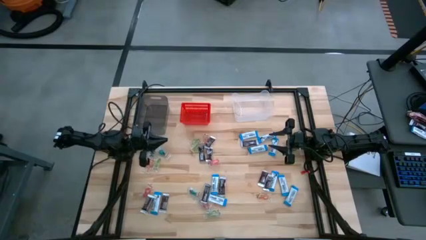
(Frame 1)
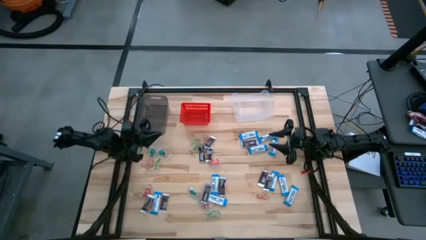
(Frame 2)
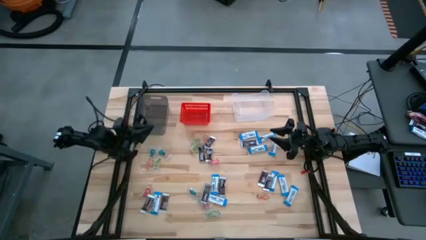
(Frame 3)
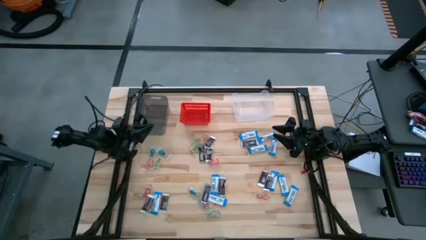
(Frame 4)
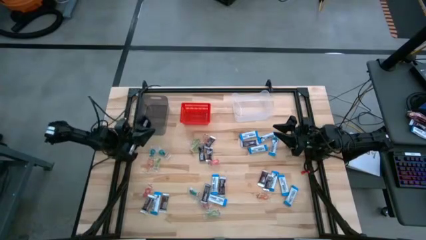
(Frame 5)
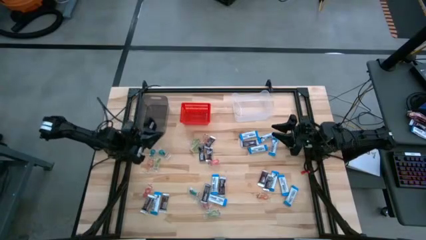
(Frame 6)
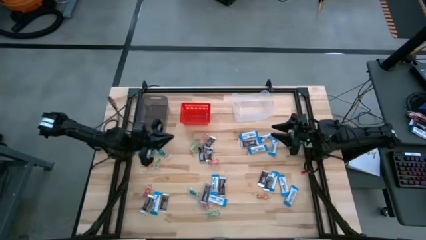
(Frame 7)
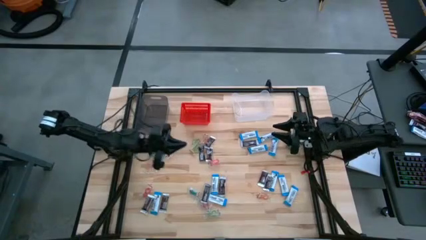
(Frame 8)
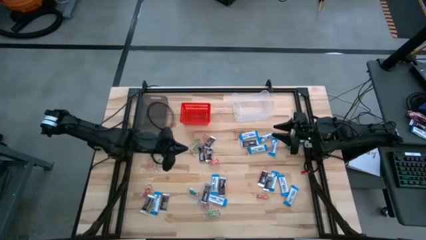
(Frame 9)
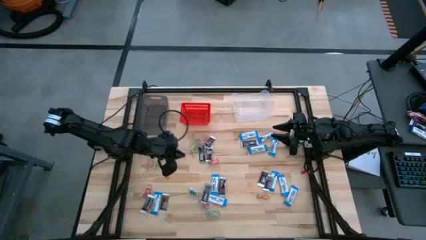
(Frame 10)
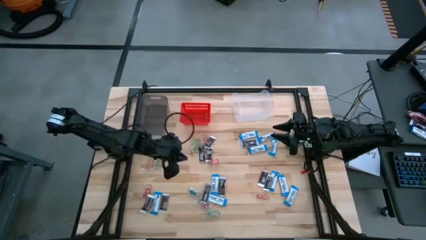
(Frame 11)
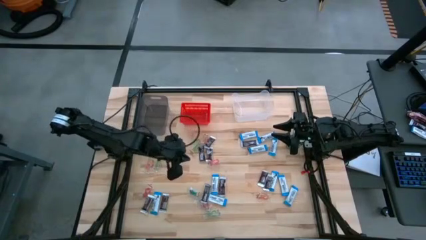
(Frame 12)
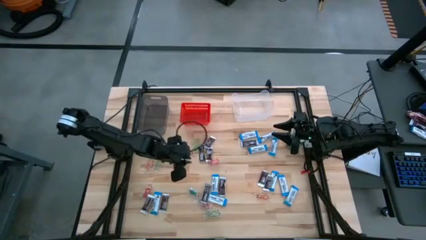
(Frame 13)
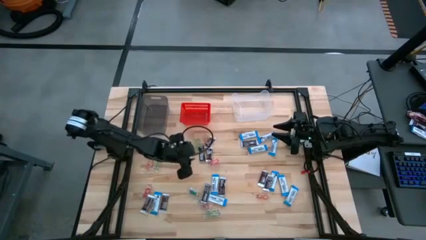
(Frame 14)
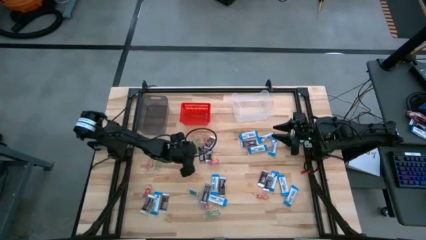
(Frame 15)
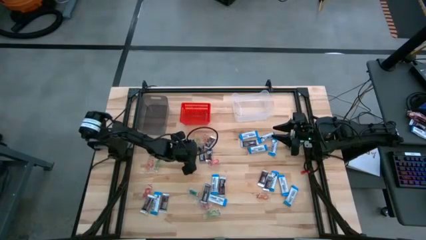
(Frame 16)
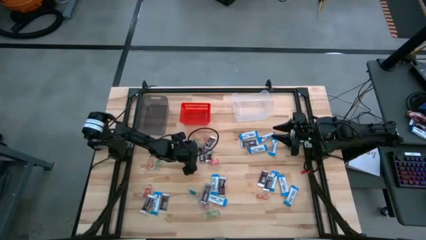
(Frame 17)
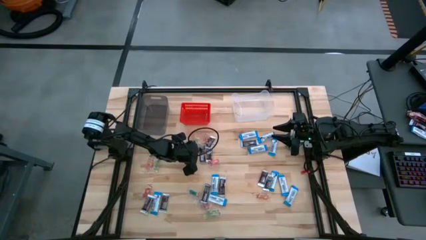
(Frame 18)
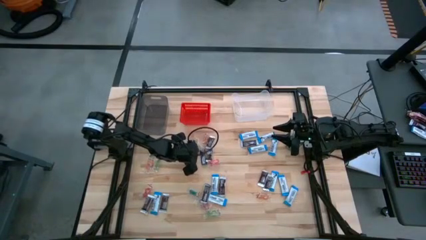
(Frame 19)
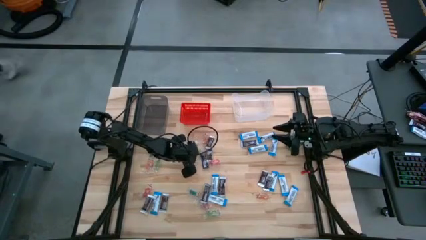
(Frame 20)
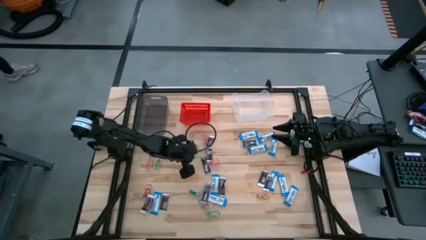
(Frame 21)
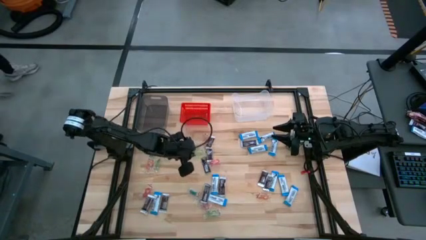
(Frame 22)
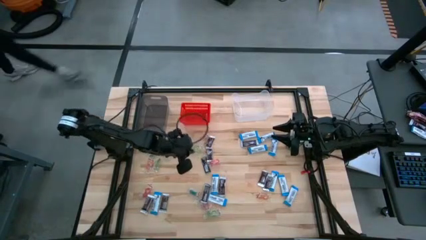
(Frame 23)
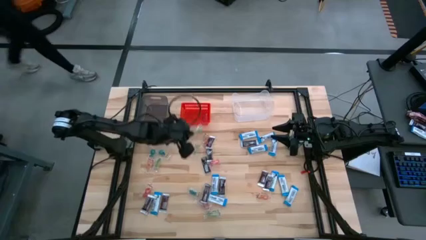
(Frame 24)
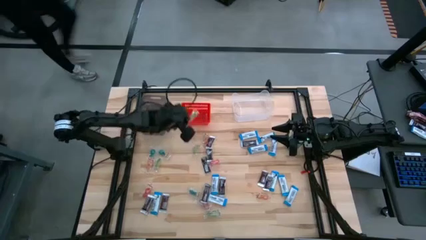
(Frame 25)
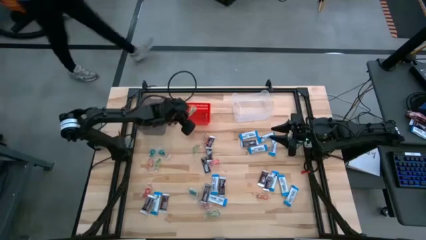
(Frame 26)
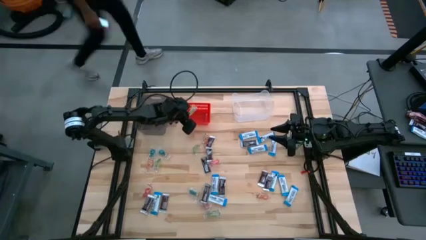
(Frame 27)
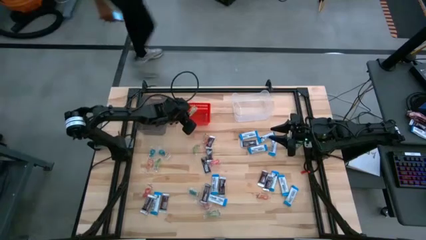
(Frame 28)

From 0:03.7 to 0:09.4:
Task: Sort candy
Put the green gummy into the red bin

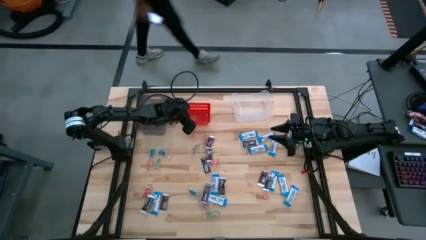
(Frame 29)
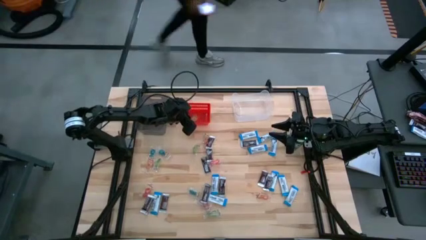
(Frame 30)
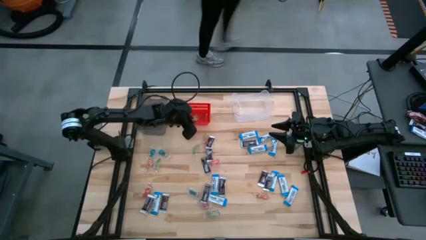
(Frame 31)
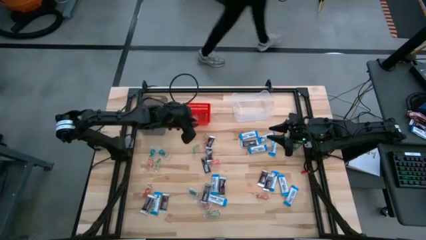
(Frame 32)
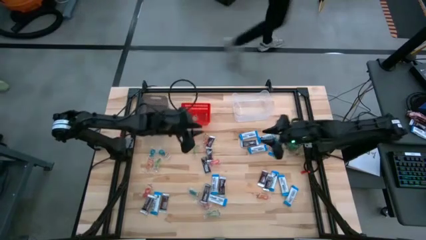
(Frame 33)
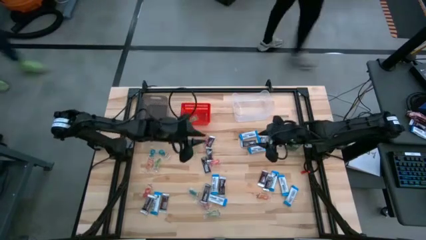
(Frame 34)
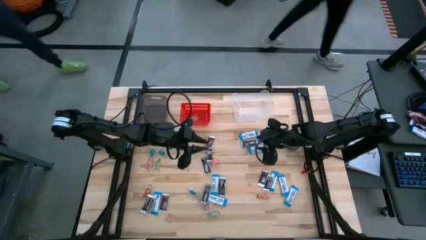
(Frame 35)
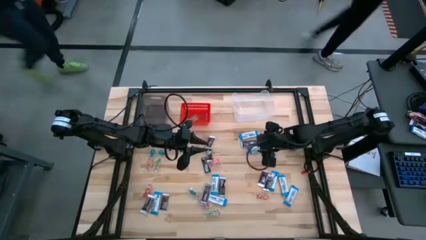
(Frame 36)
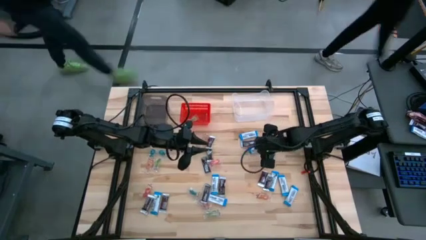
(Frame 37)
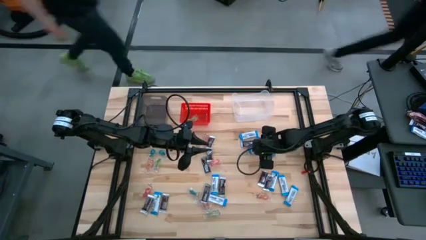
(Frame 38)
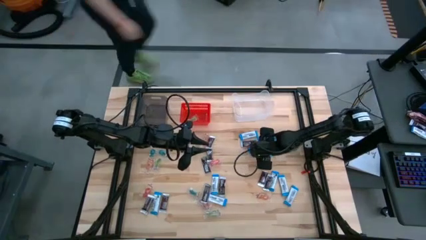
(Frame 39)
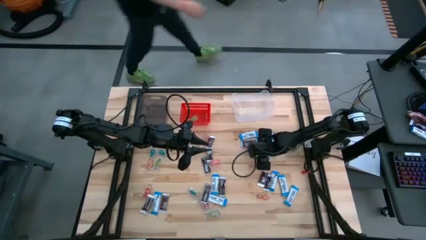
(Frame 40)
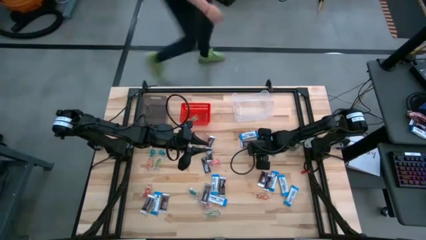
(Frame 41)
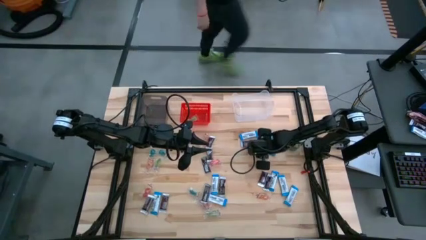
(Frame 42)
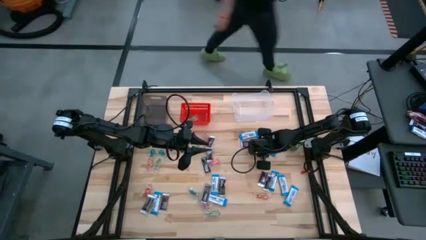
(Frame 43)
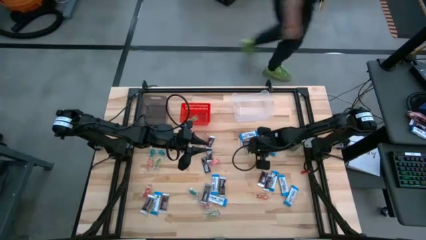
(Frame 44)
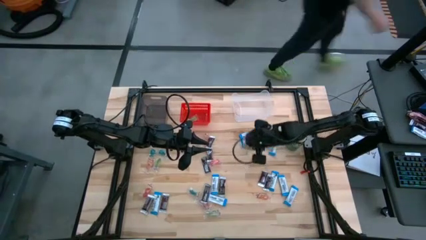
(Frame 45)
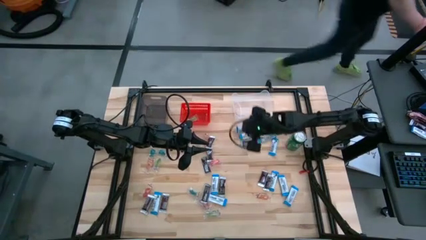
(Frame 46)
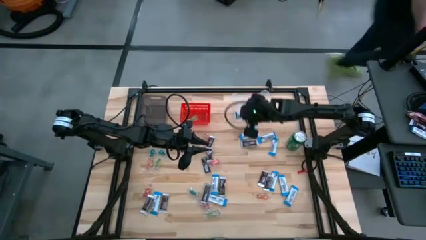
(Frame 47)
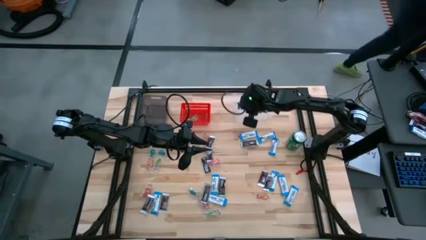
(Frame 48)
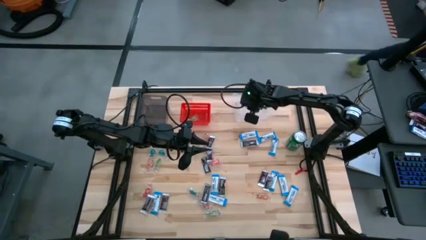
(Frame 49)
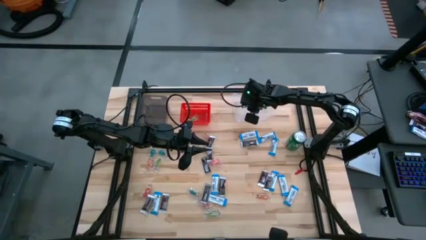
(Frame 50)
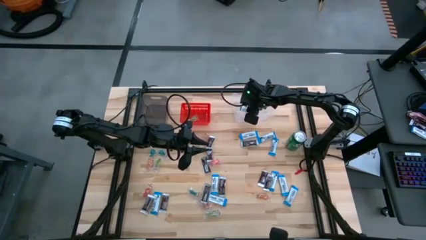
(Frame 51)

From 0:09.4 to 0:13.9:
Put the white chocolate into the transparent bin

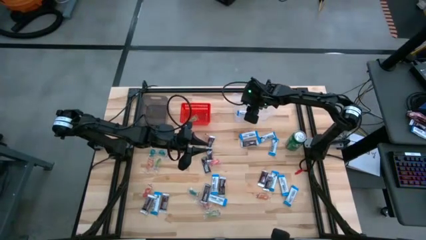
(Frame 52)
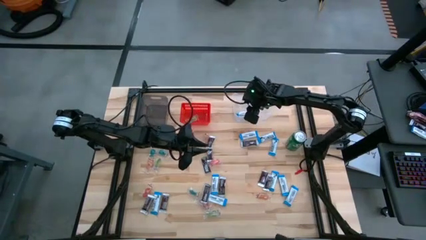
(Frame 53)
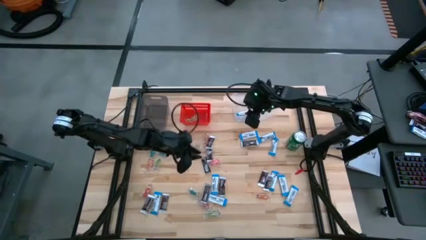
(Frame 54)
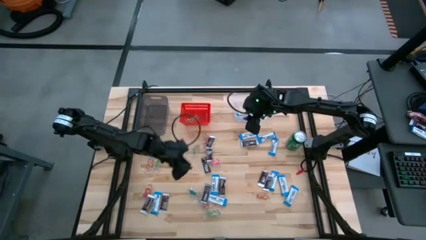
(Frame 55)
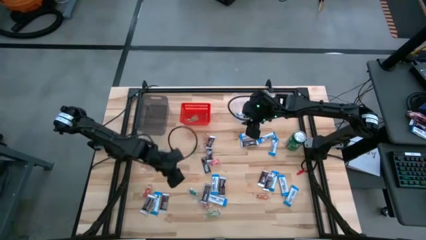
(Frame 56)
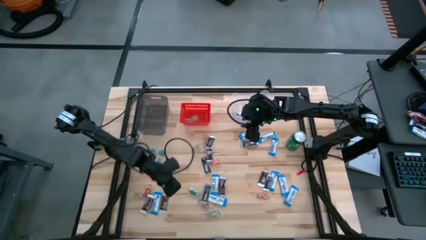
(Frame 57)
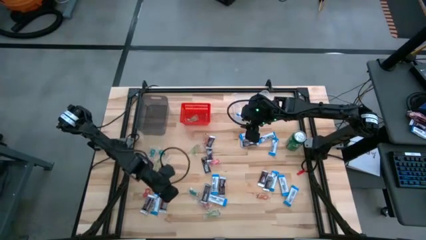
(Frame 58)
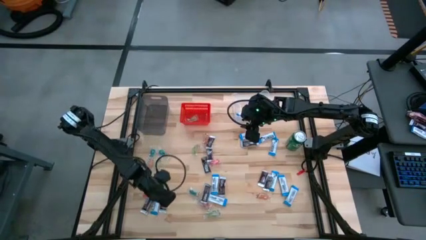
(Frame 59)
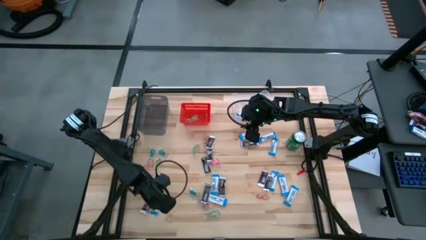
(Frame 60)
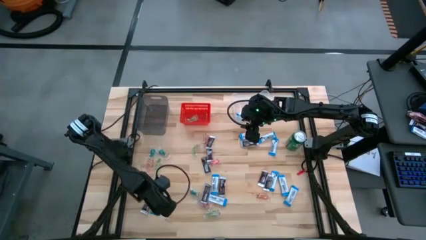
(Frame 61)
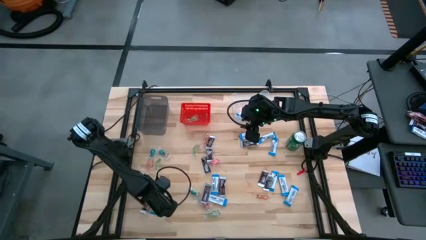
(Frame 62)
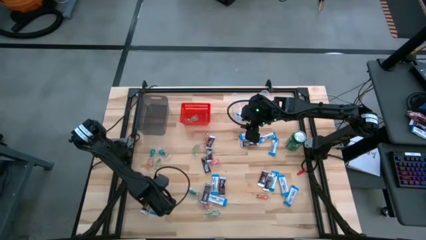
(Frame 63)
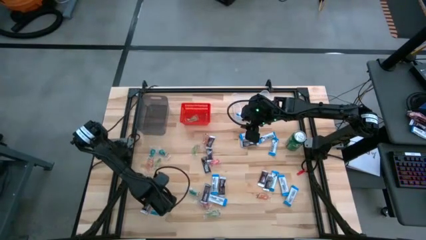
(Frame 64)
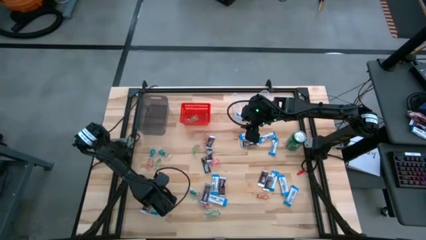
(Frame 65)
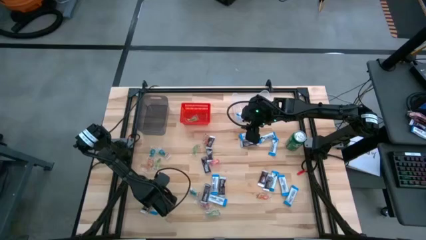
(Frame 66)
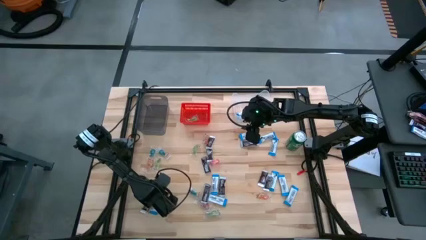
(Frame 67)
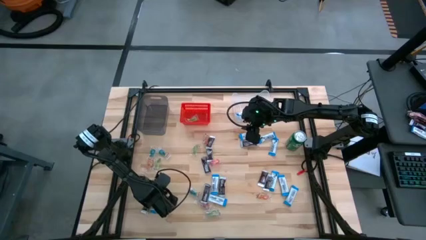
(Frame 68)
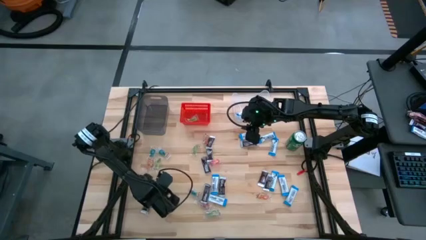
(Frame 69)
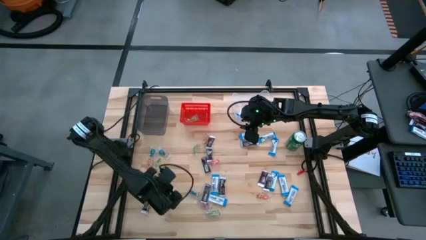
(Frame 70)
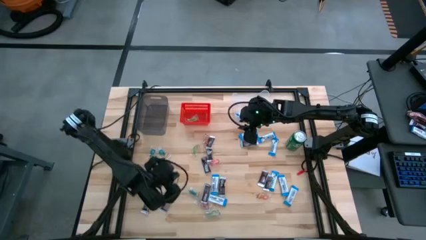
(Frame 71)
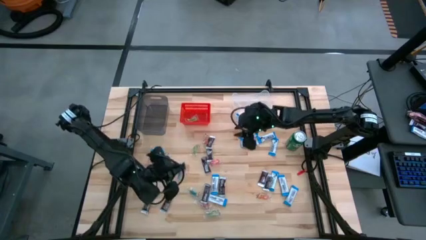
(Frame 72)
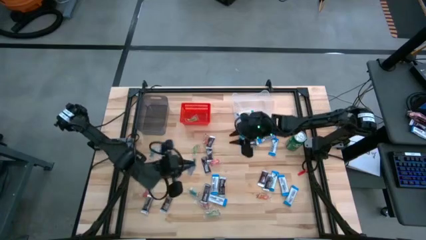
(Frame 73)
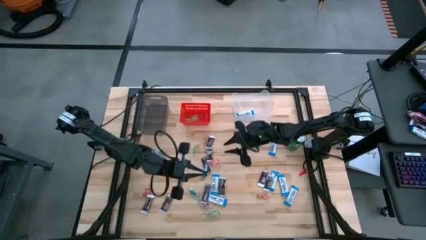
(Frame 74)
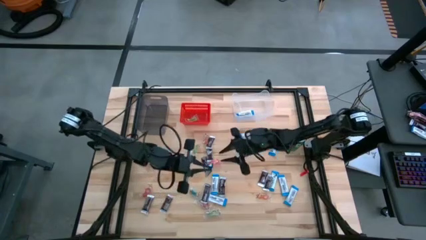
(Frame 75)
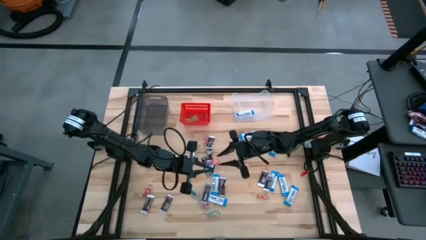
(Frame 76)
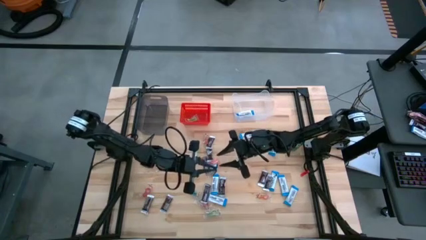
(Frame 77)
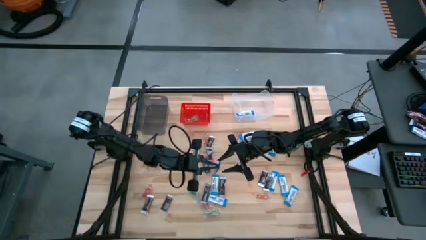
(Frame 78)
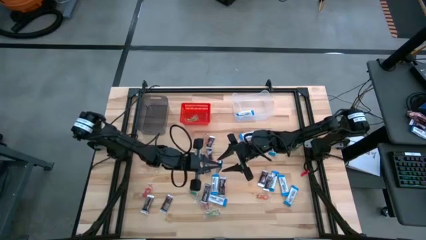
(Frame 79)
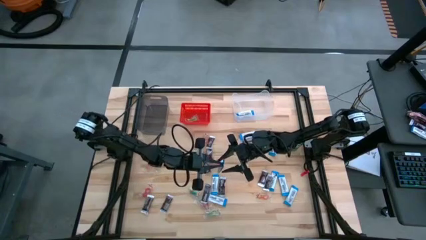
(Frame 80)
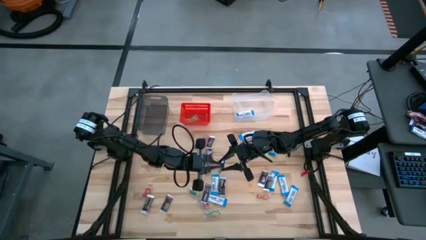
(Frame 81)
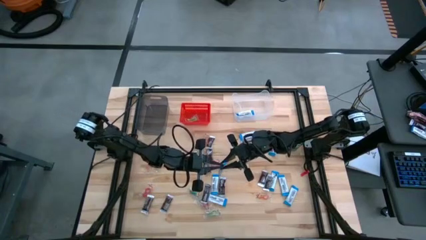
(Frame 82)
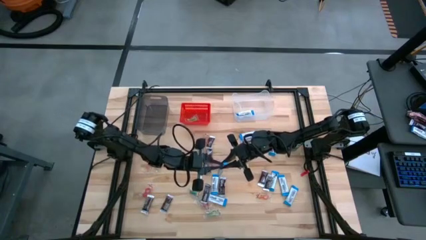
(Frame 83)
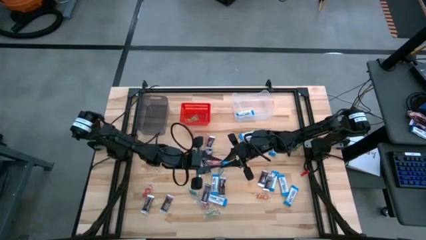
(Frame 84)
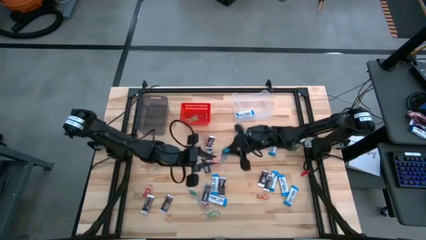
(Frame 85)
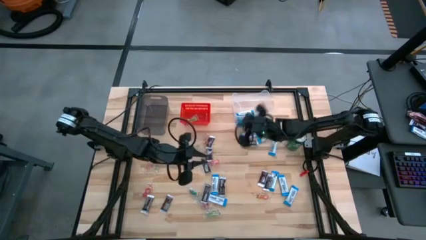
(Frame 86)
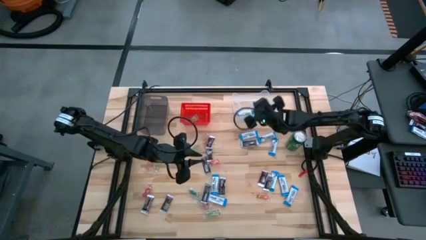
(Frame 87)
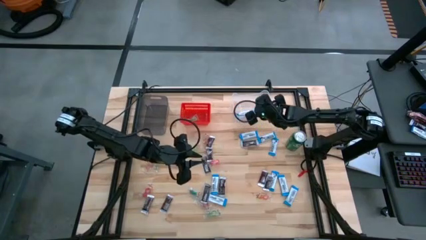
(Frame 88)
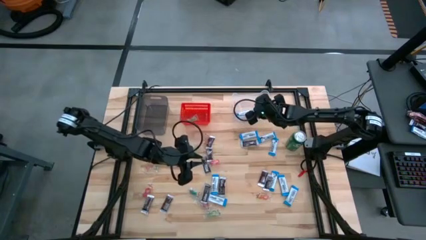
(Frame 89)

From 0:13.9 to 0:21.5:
Put the white chocolate into the transparent bin
